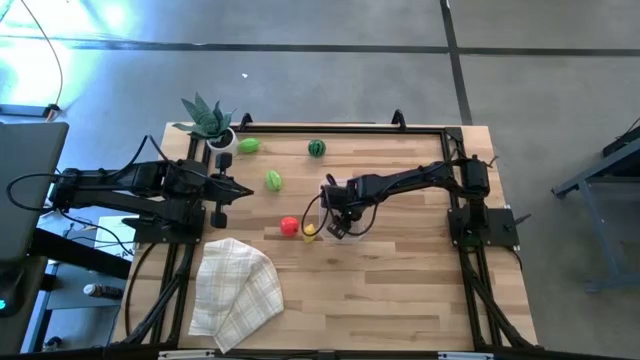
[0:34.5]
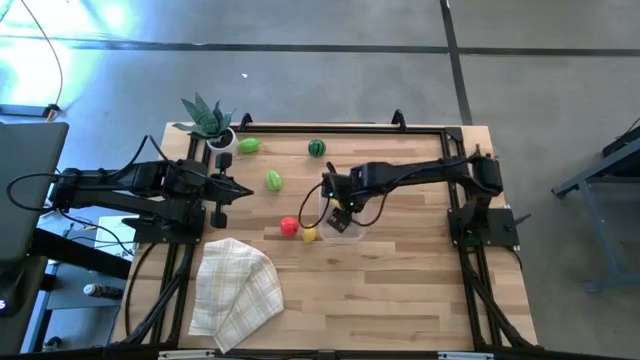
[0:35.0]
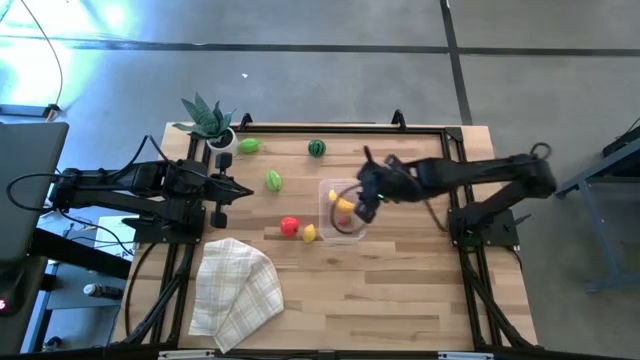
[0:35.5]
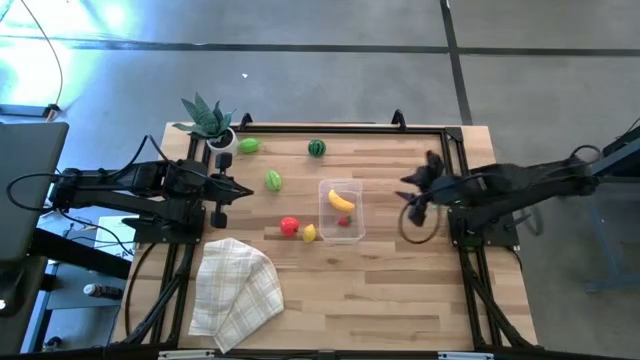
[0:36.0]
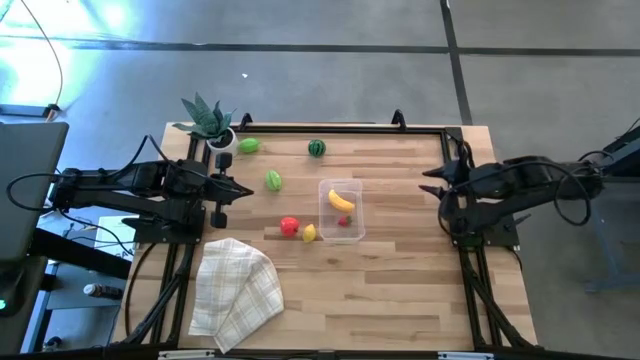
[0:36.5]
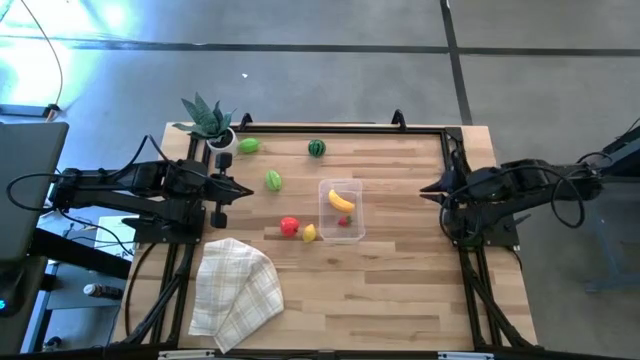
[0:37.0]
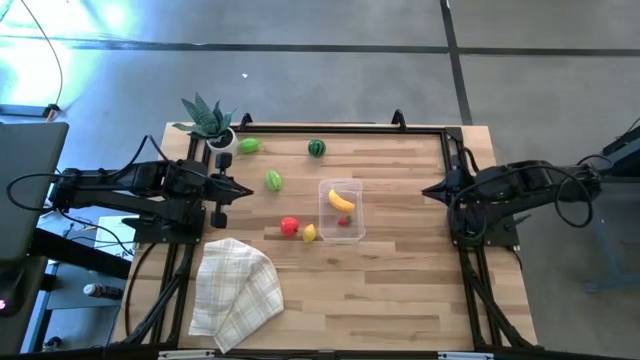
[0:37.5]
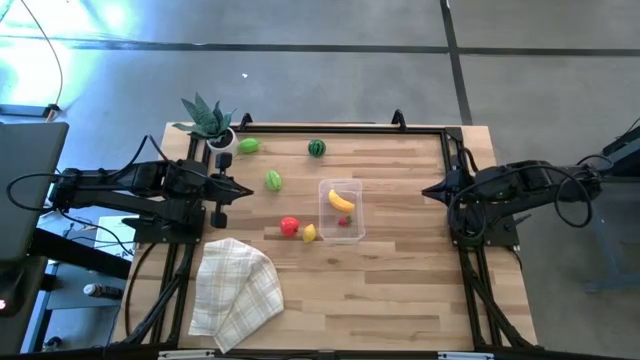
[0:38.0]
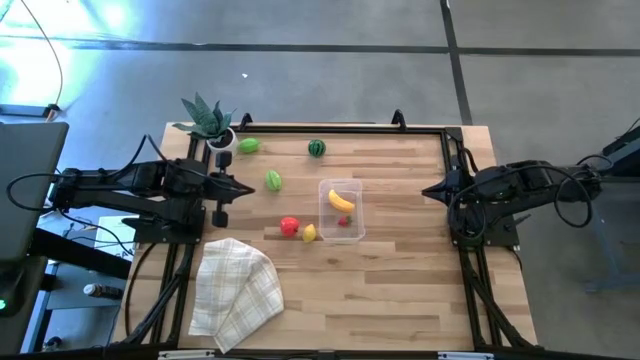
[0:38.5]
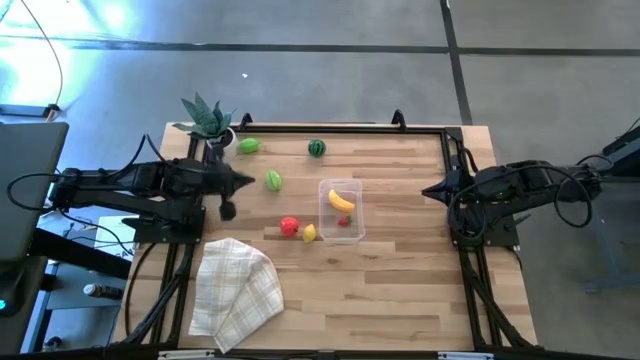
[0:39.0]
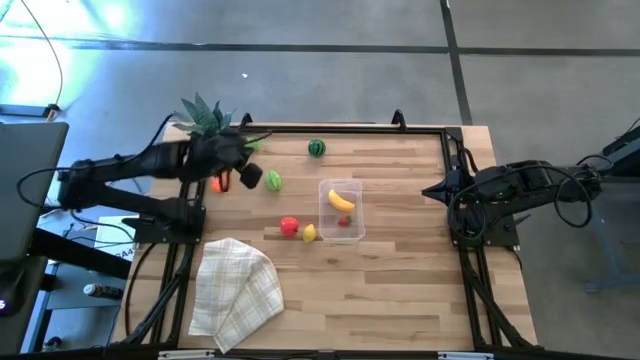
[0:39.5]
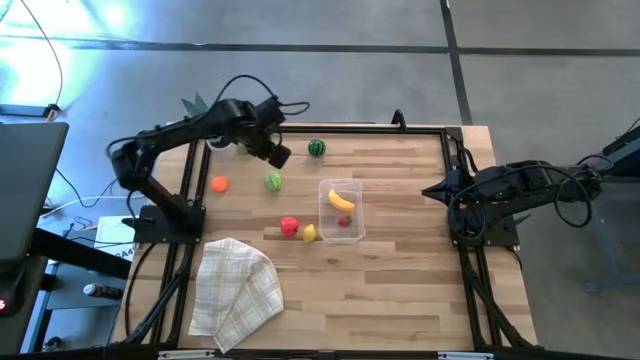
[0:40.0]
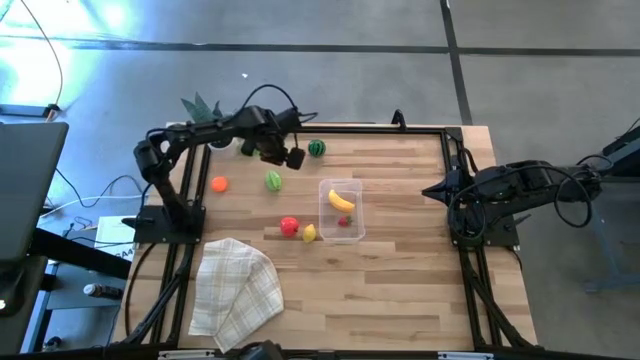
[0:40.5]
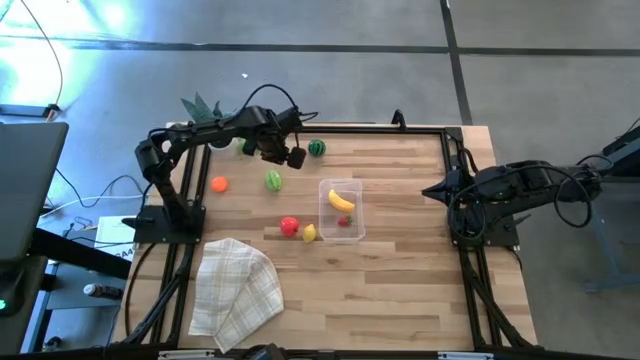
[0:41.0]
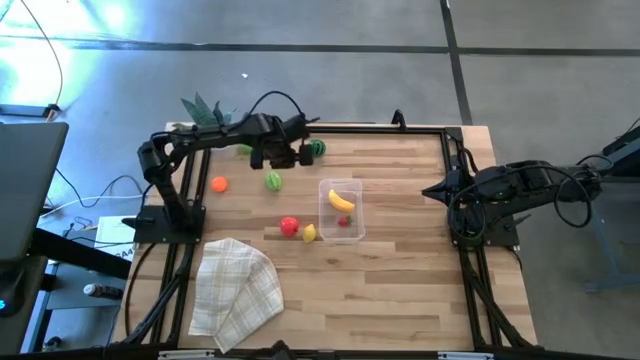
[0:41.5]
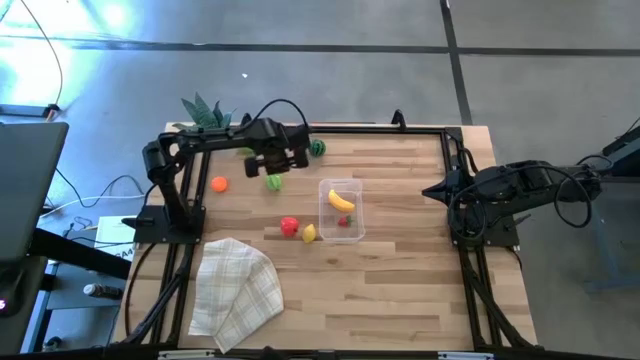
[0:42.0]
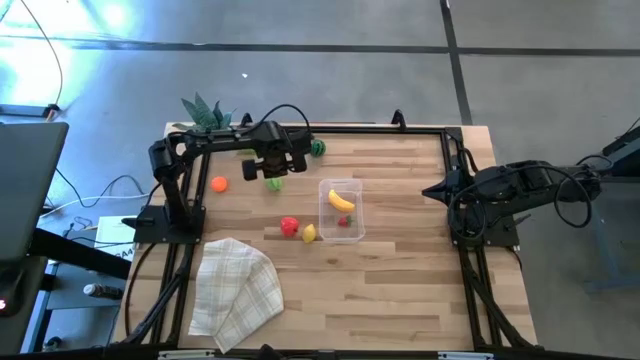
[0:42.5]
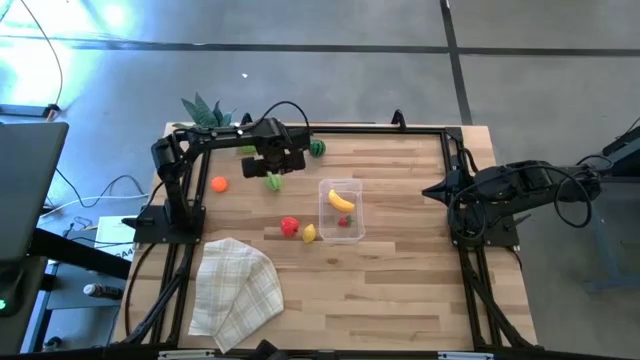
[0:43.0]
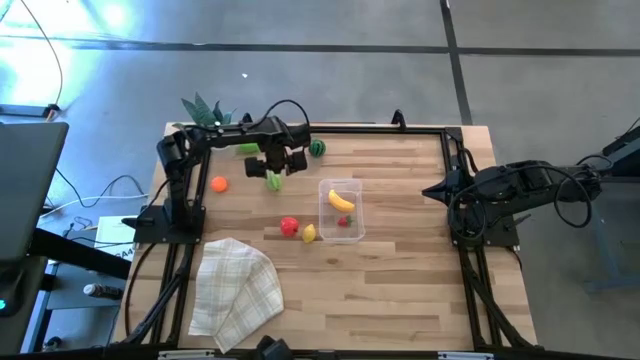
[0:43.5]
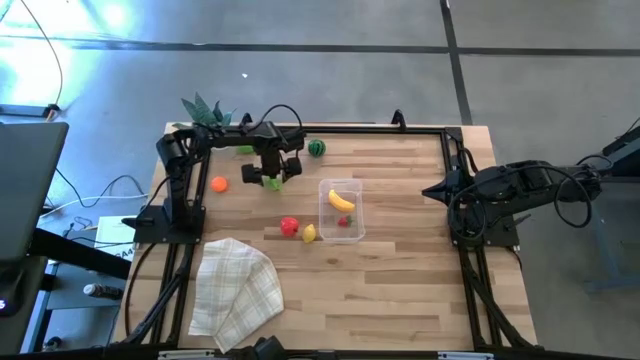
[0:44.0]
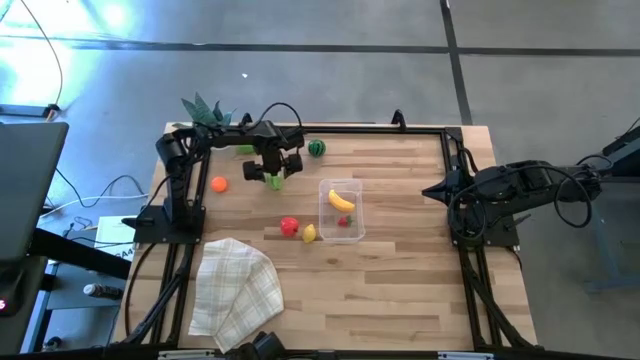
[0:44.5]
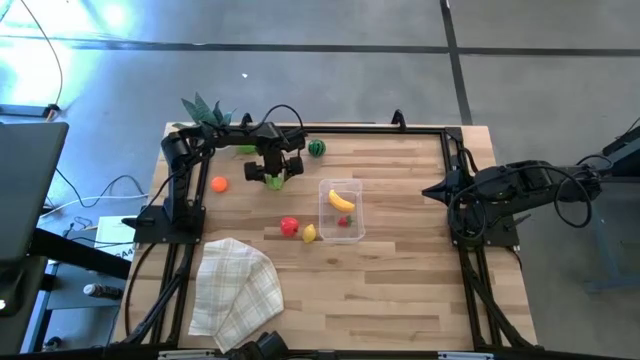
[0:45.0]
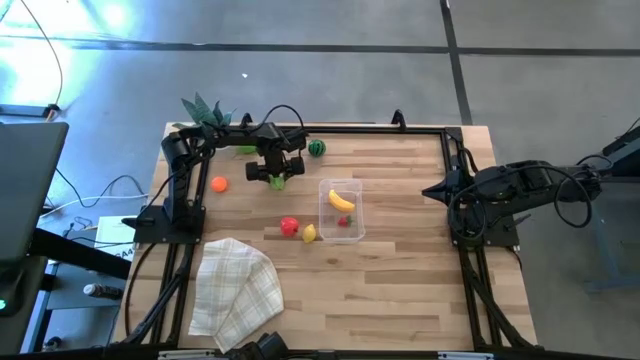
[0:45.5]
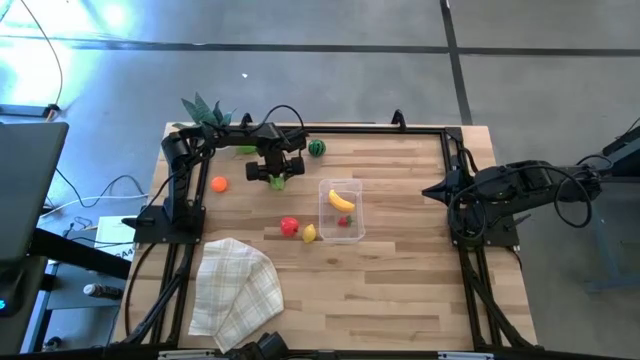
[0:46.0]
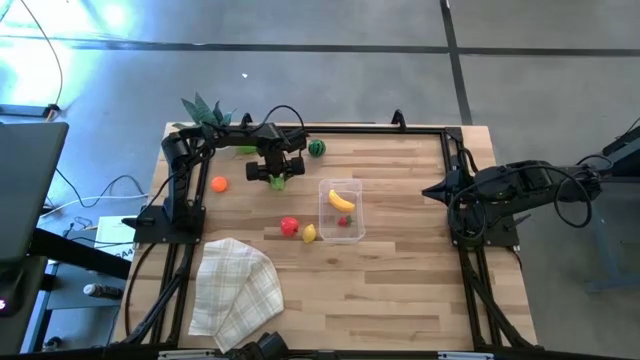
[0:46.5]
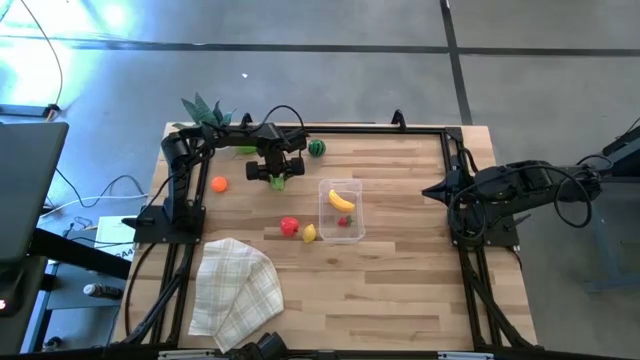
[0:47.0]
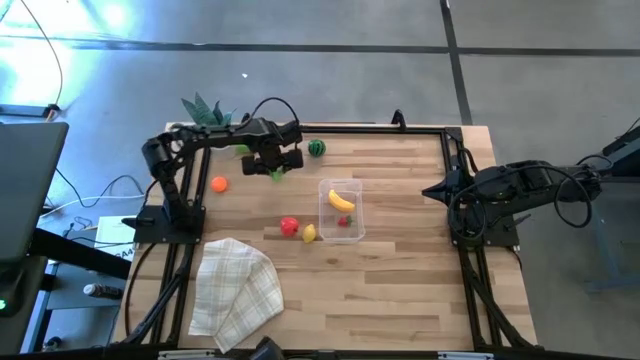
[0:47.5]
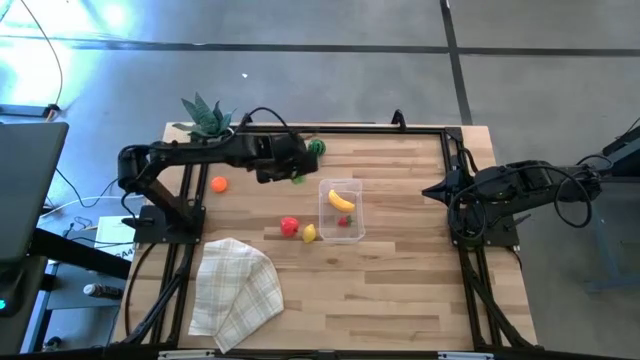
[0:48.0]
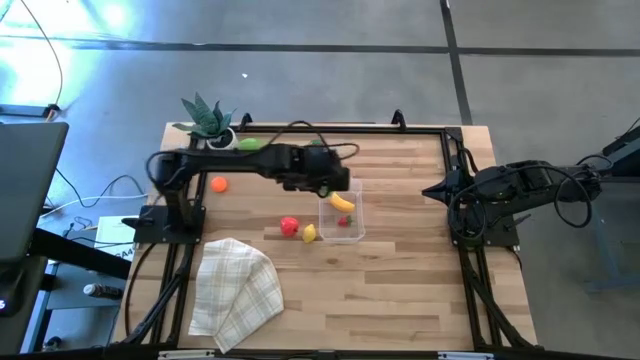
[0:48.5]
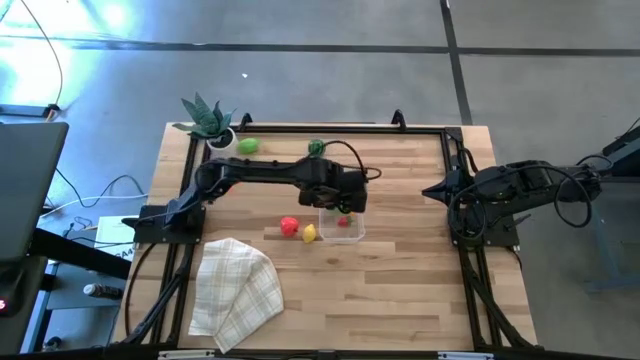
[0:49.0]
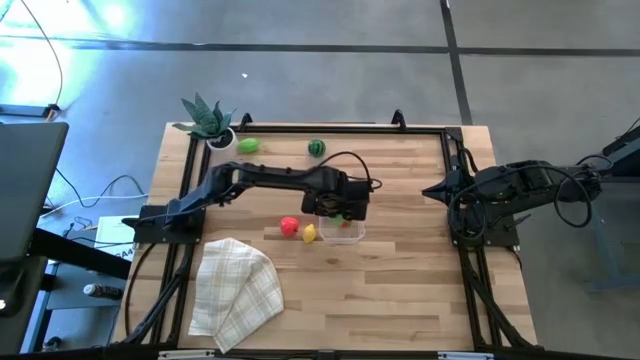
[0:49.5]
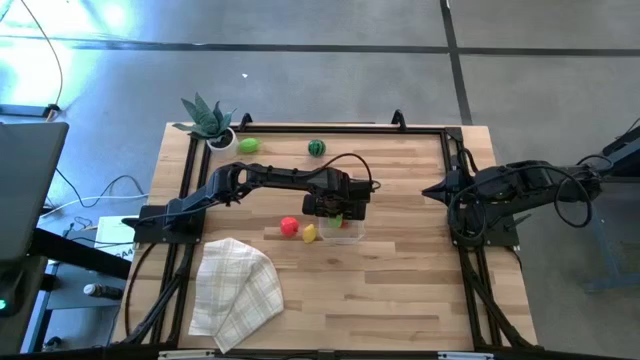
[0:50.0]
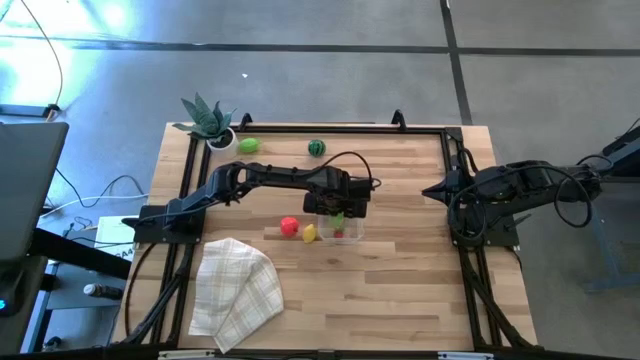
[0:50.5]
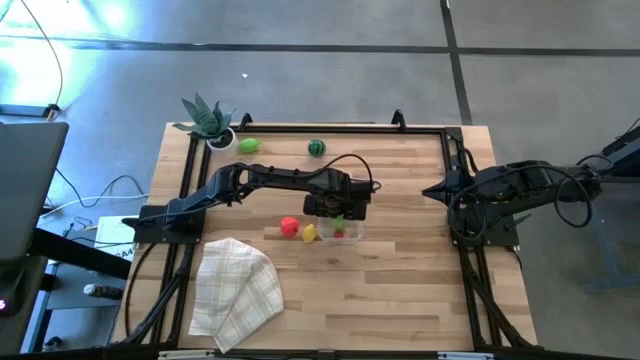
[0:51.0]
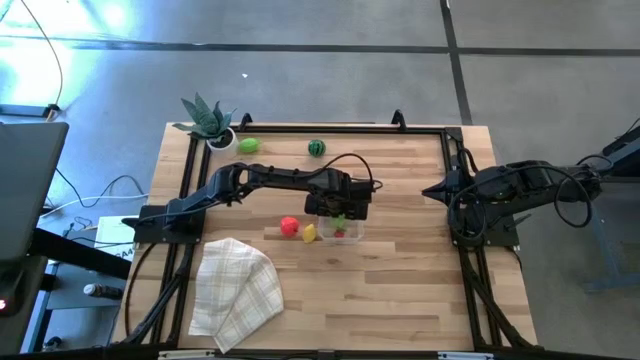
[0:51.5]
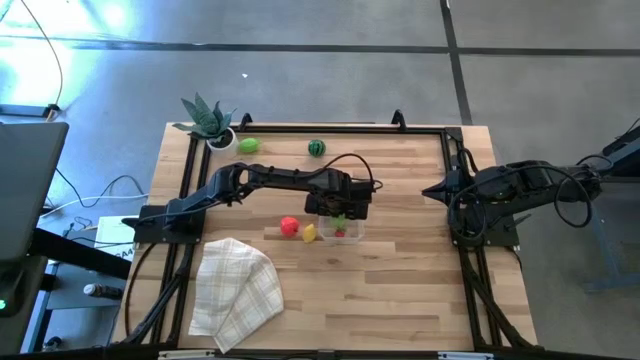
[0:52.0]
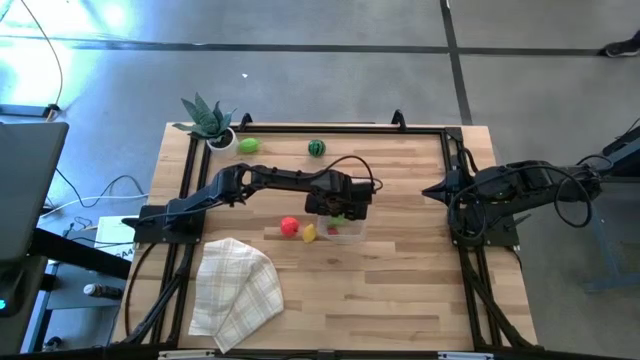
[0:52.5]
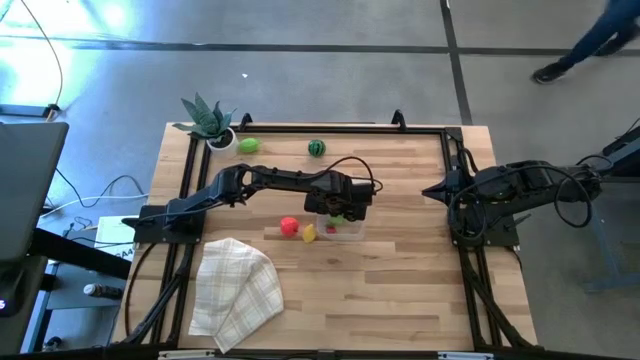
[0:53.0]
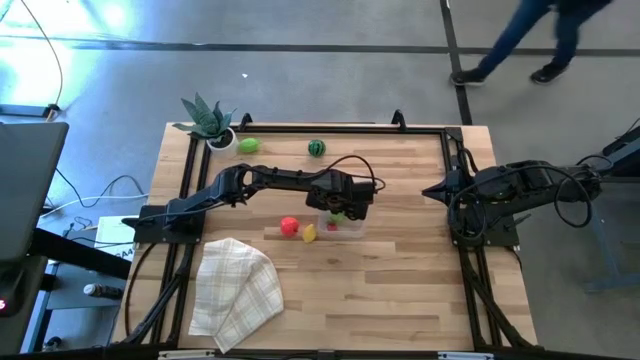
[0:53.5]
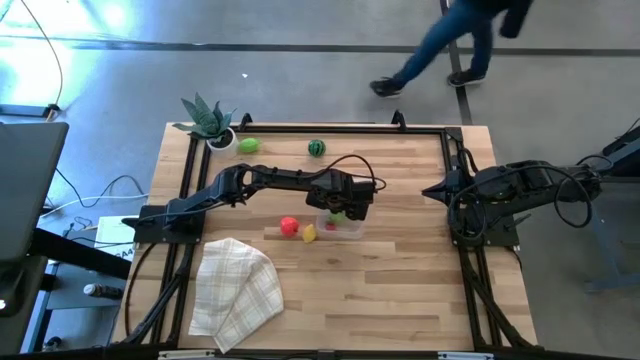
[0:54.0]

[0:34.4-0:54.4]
Task: Pick and placing Produce into tupperware
Put the star fruit into the transparent bin
